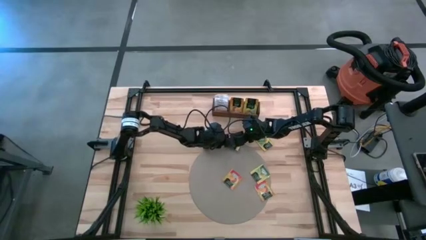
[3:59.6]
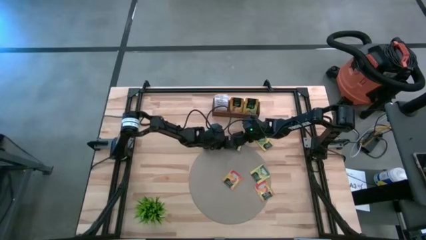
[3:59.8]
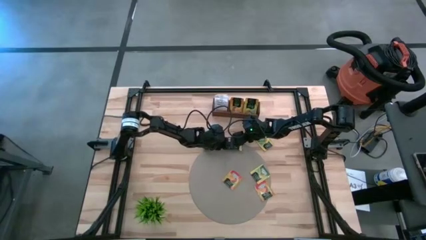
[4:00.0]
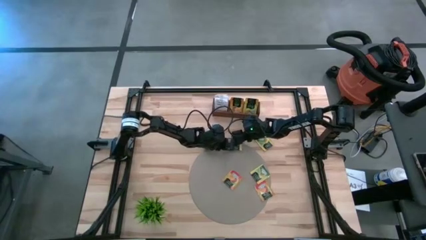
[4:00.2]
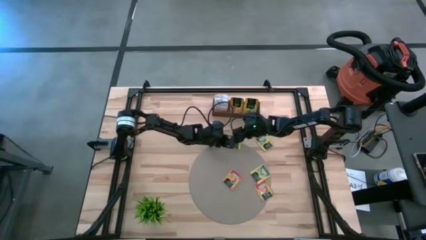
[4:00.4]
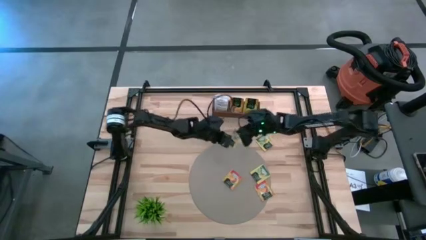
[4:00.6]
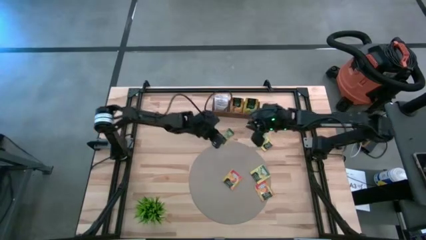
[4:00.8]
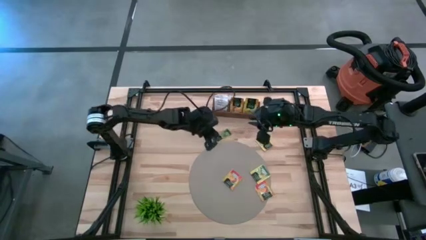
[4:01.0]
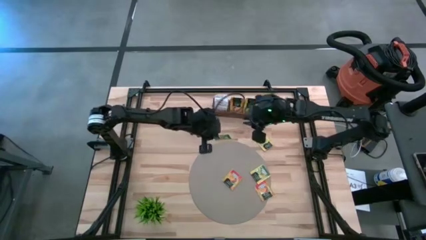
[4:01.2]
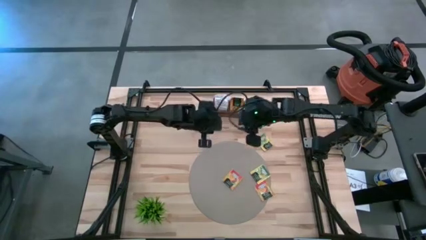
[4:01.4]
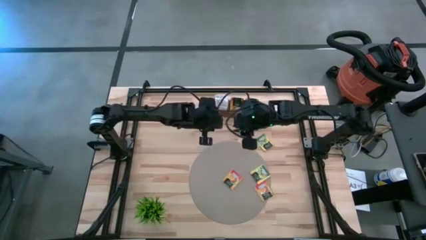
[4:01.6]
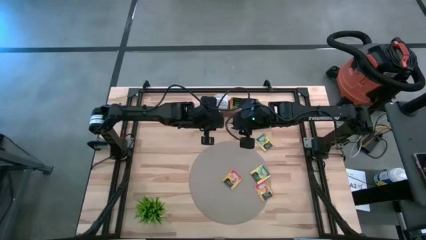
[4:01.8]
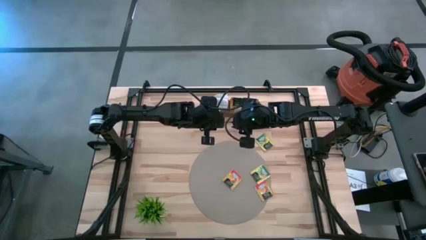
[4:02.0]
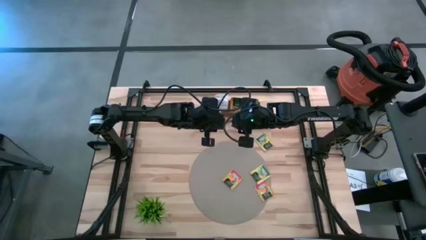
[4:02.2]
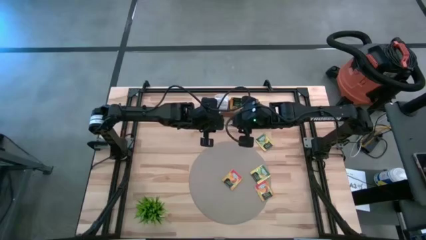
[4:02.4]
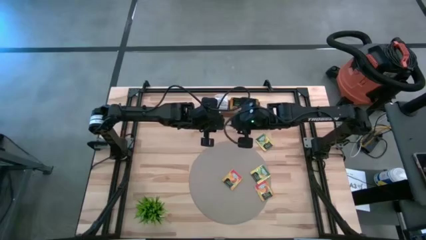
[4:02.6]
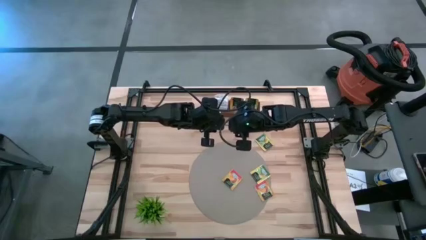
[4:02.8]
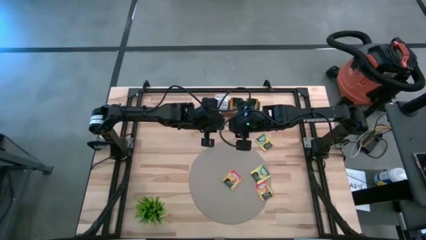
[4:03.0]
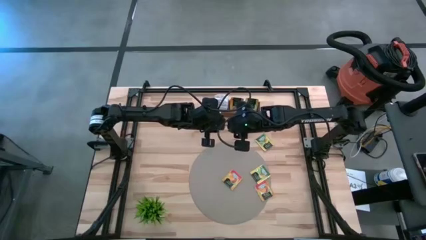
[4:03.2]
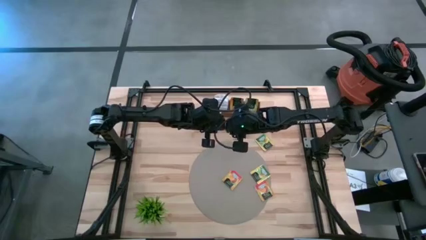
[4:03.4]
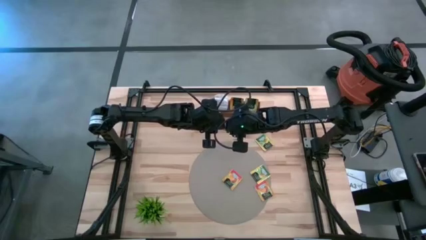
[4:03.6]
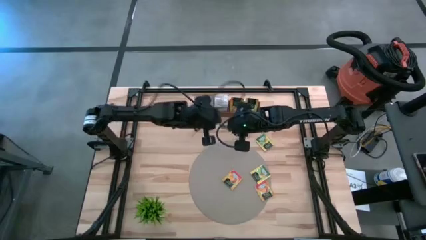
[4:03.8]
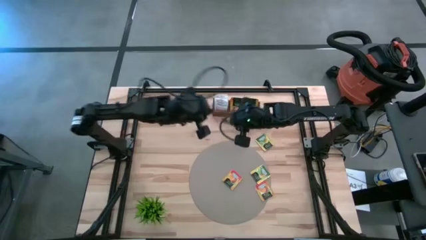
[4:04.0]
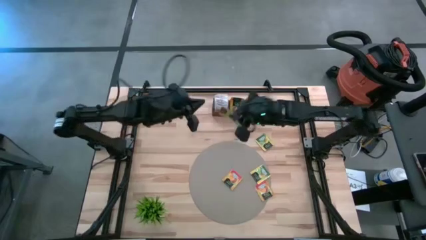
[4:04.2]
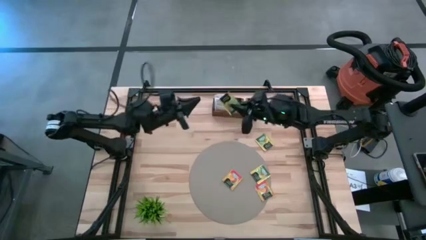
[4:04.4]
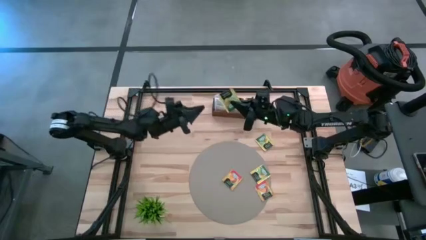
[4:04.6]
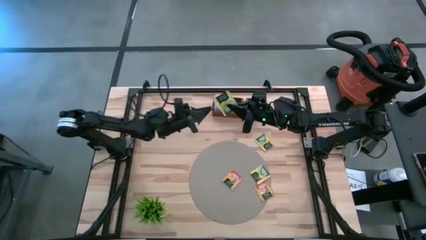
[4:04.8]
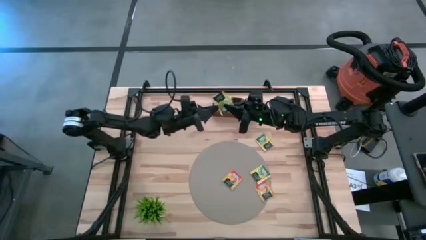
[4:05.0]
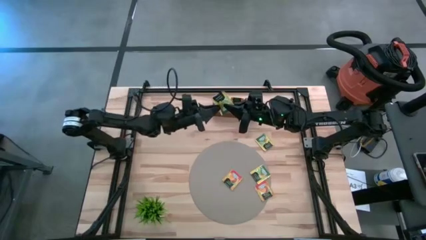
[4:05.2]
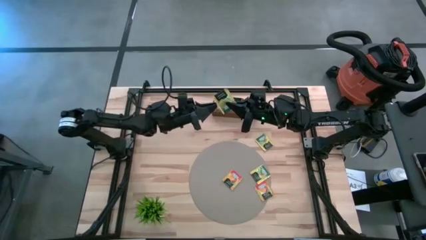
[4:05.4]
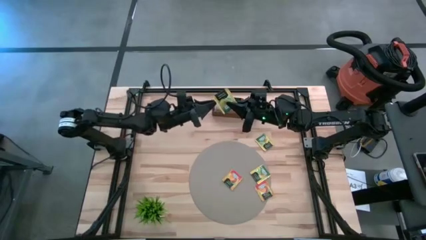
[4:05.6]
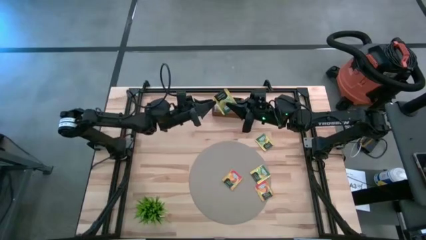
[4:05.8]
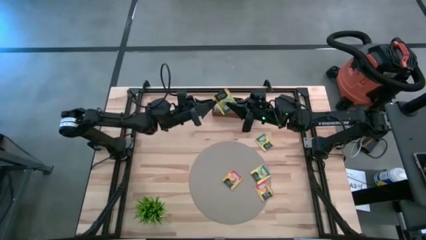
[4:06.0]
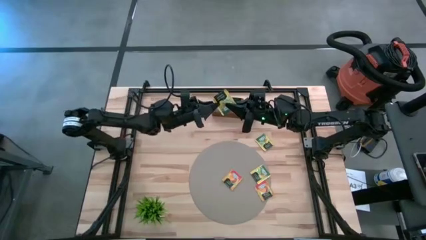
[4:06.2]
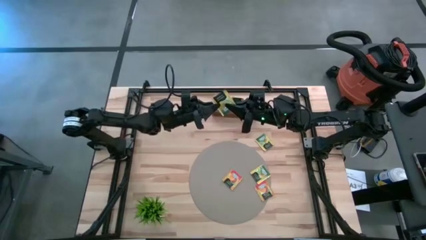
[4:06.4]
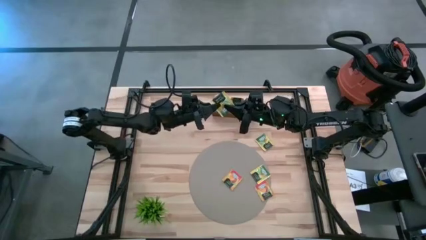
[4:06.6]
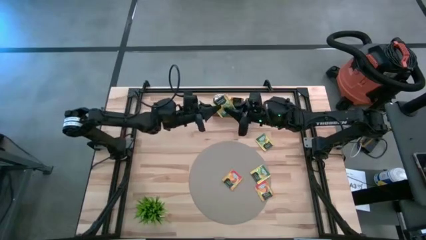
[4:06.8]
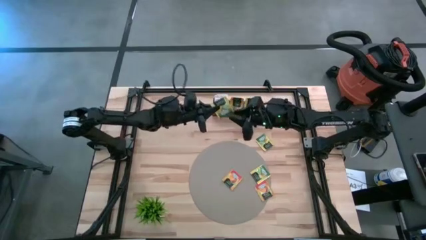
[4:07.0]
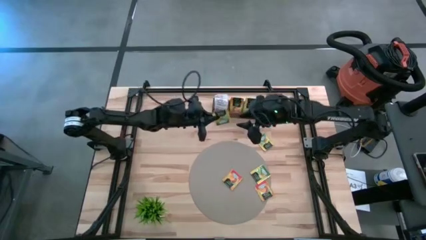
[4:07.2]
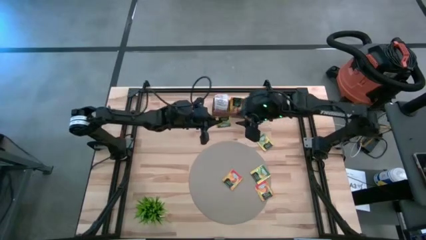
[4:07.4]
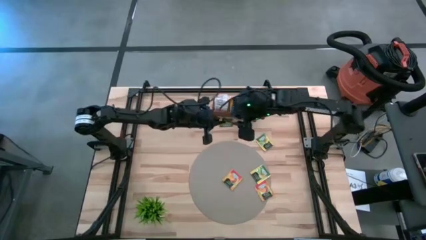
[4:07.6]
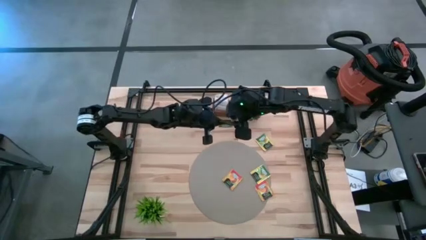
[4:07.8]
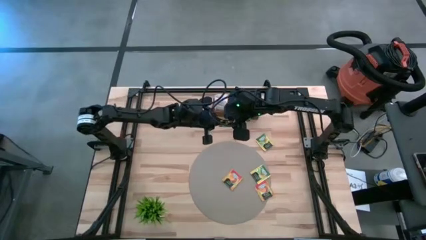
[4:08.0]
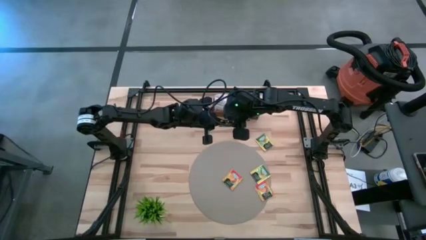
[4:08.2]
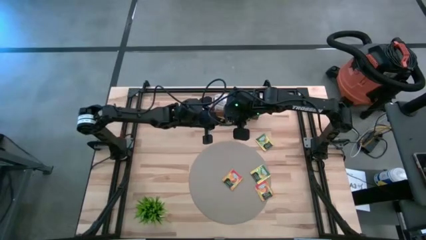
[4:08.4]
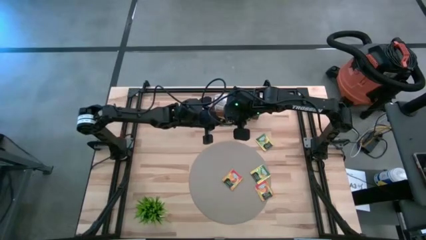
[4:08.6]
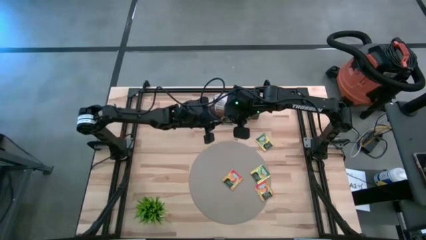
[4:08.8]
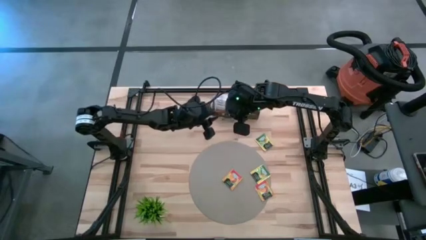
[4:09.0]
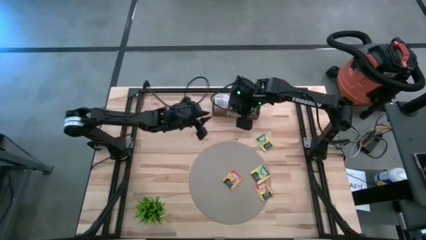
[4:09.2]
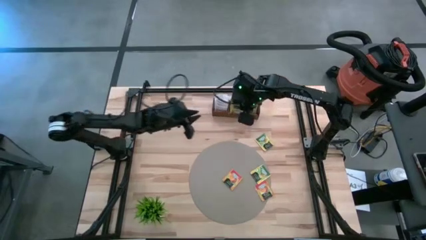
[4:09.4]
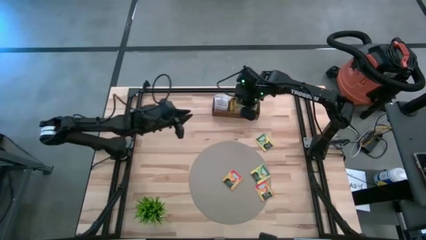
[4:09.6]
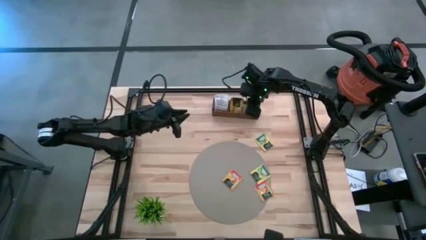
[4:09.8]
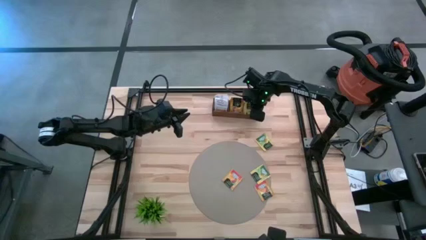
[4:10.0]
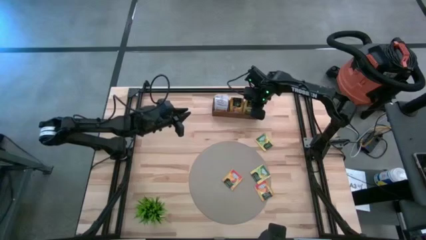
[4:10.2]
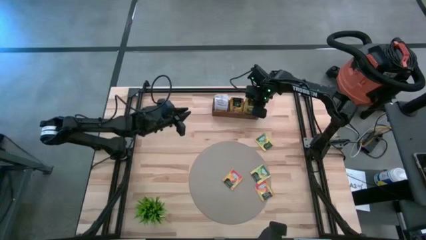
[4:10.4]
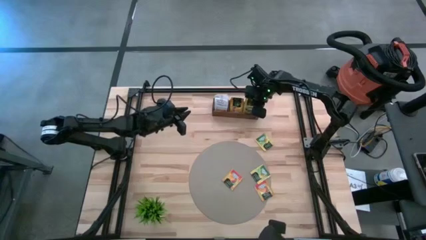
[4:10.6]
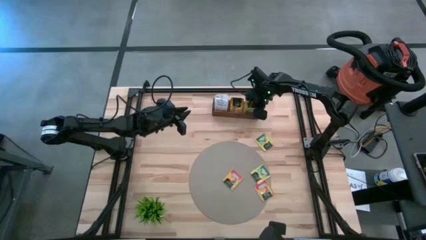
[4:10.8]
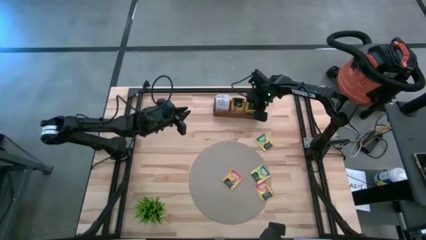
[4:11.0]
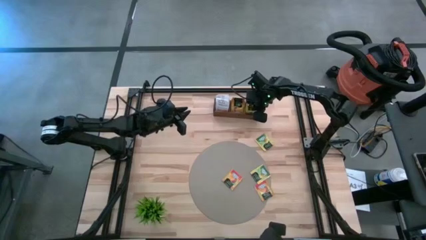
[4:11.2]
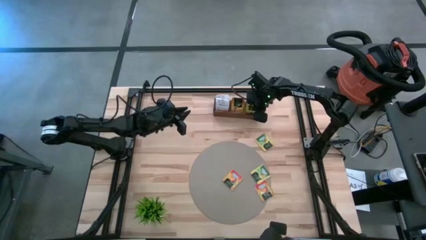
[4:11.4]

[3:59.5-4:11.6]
Task: Pick & Place Tea
Put the yellow tea bag into the right section of the wooden organizer
